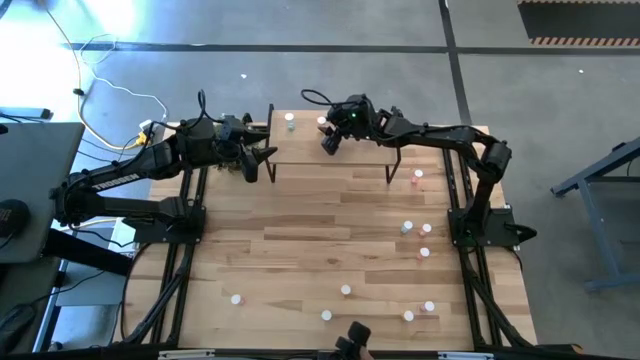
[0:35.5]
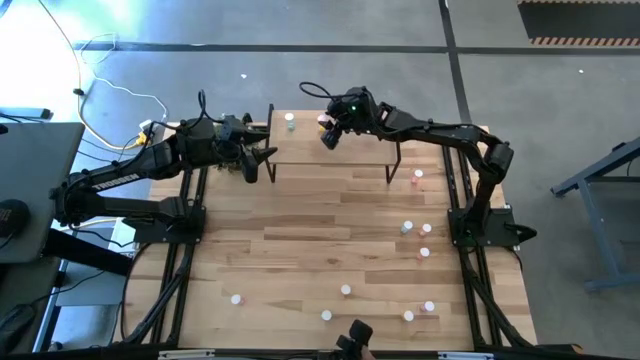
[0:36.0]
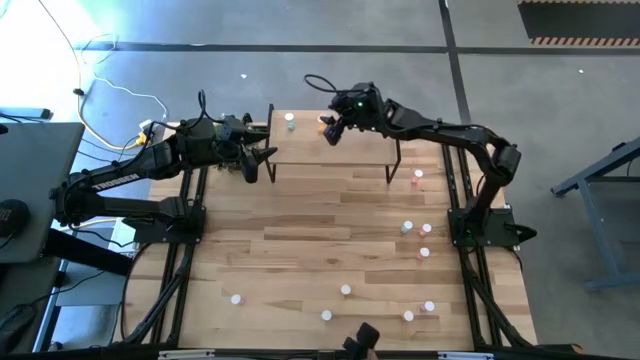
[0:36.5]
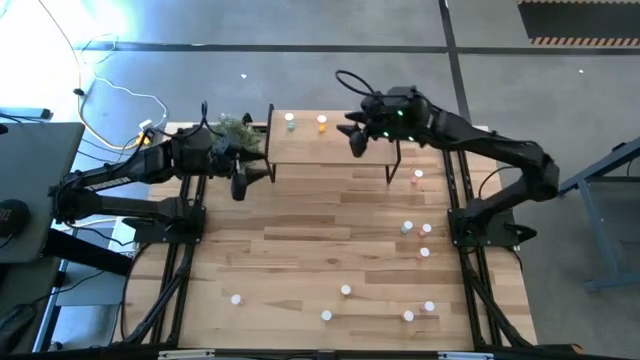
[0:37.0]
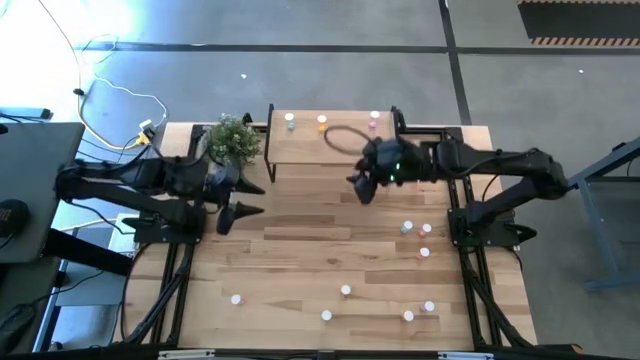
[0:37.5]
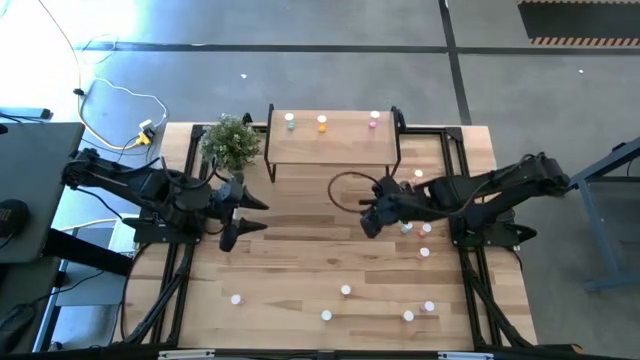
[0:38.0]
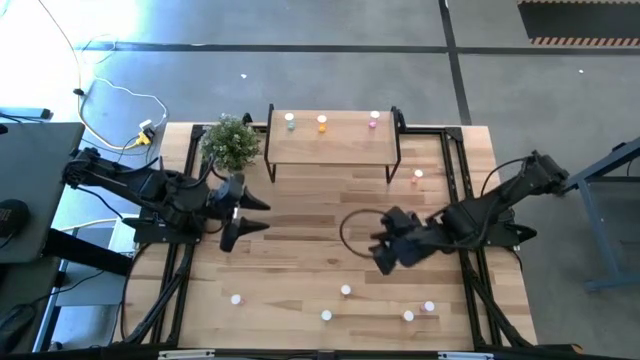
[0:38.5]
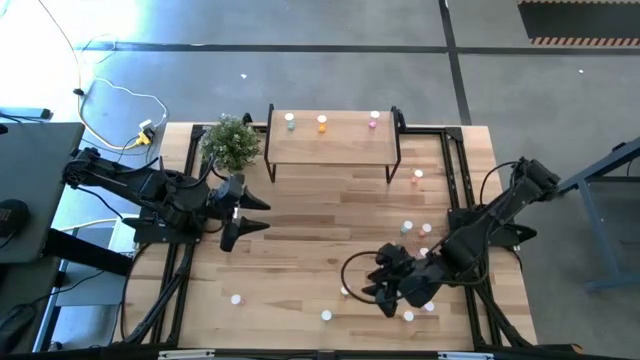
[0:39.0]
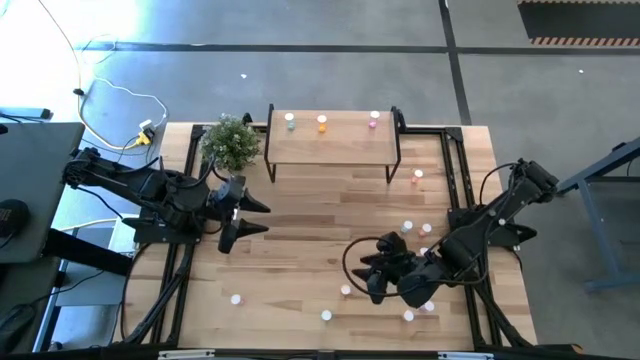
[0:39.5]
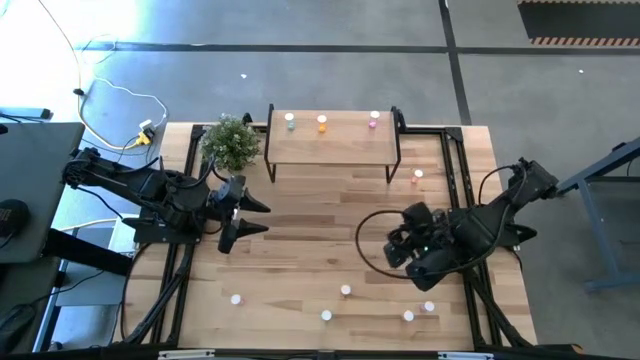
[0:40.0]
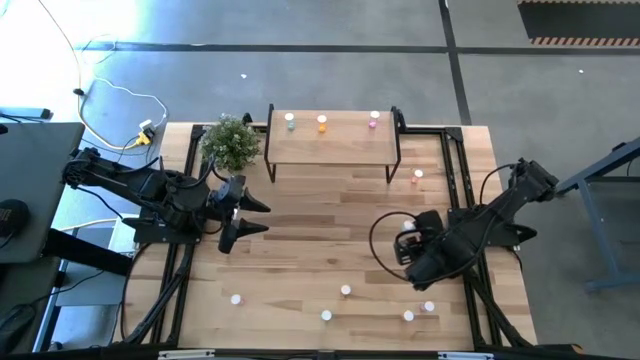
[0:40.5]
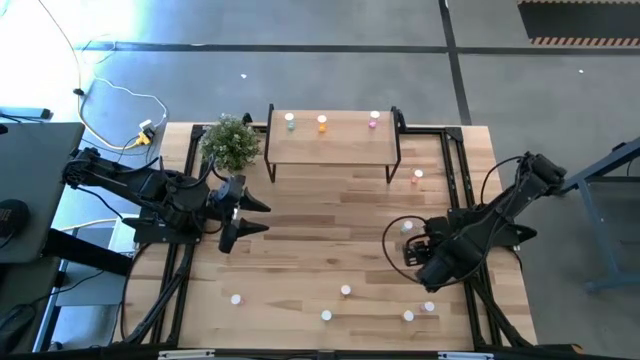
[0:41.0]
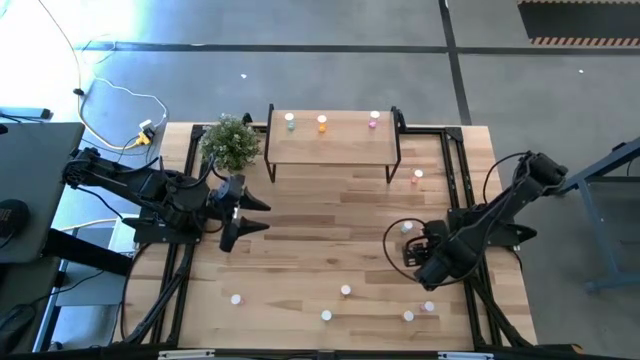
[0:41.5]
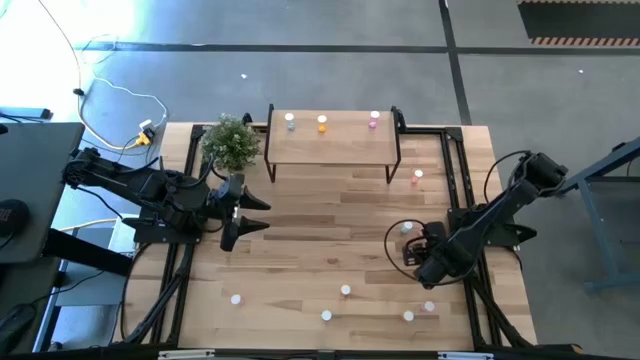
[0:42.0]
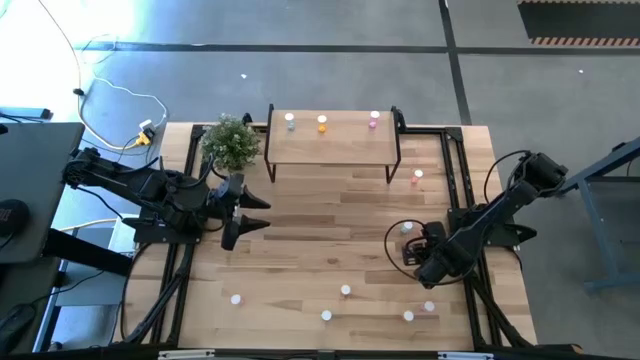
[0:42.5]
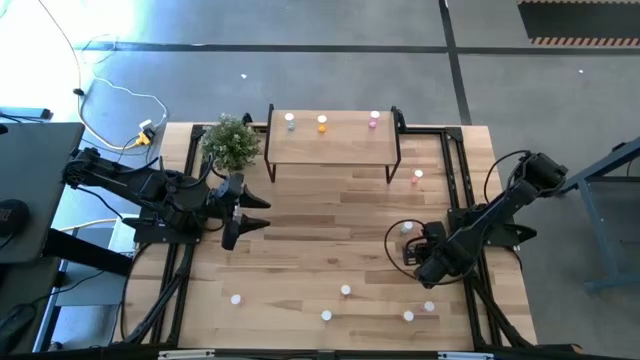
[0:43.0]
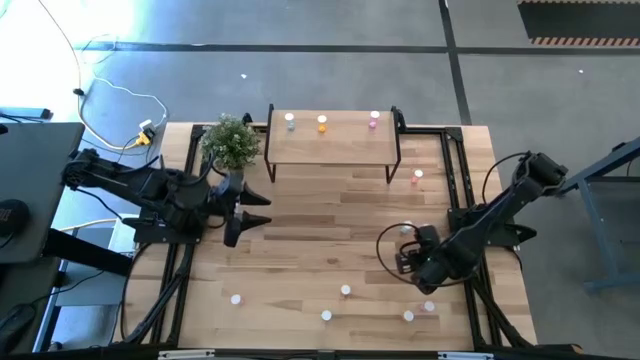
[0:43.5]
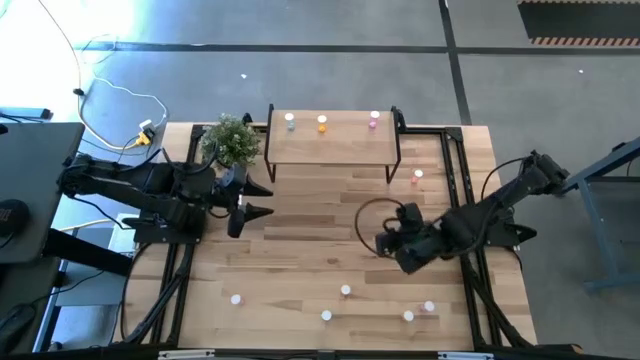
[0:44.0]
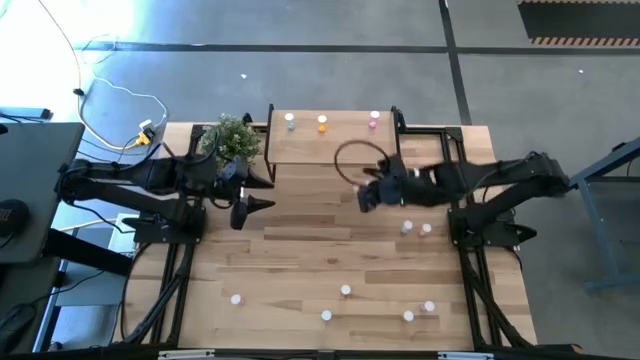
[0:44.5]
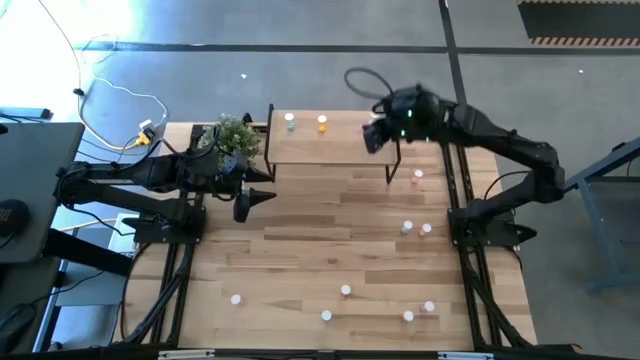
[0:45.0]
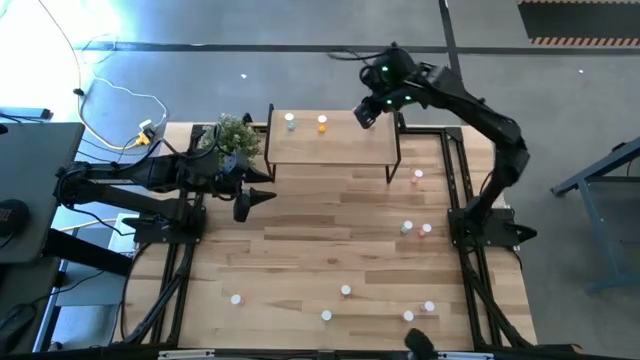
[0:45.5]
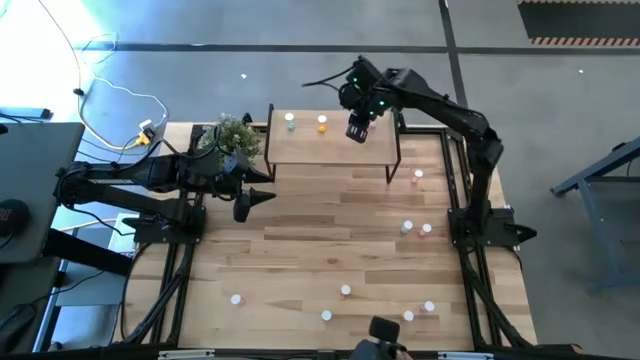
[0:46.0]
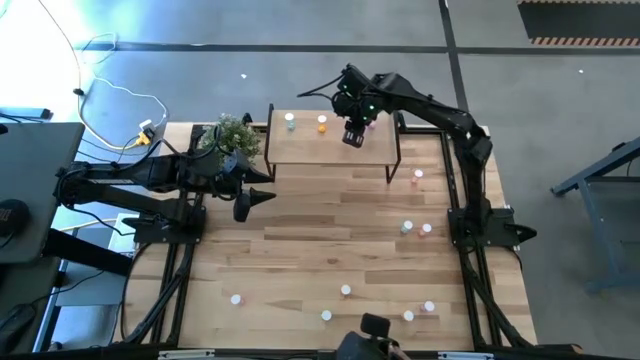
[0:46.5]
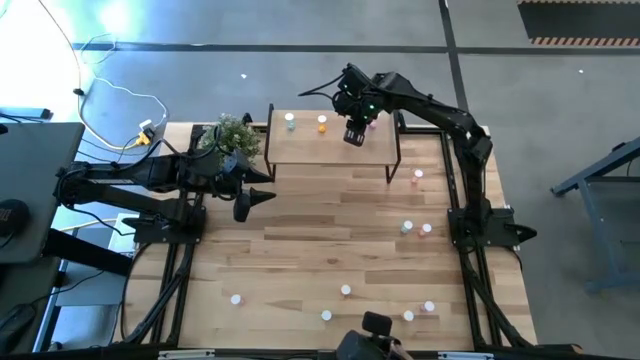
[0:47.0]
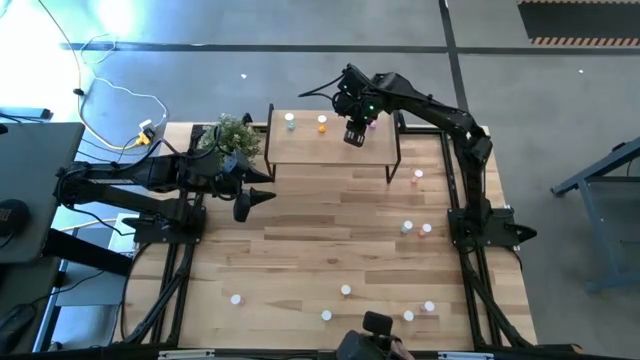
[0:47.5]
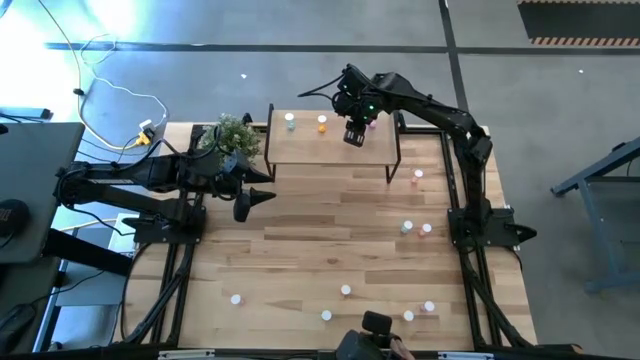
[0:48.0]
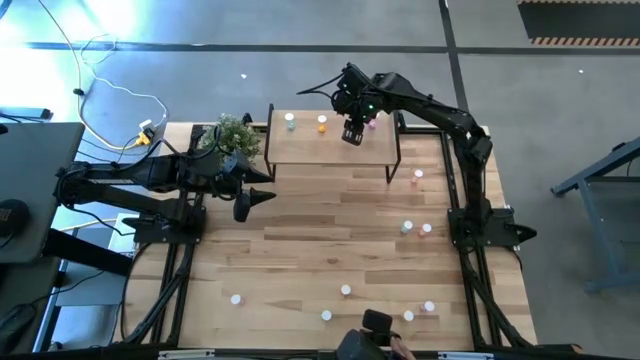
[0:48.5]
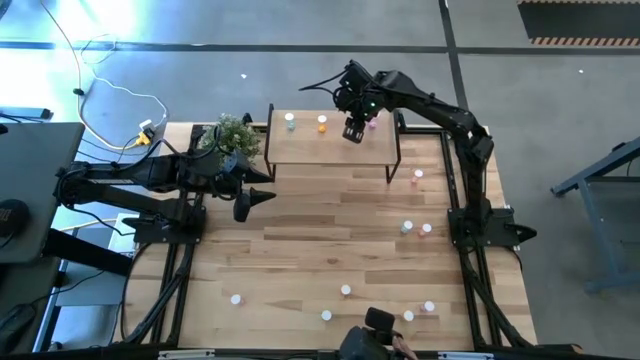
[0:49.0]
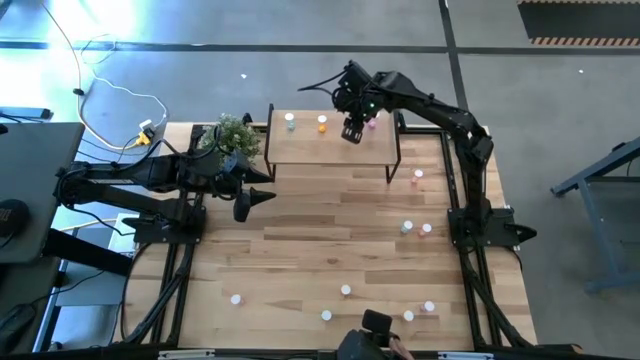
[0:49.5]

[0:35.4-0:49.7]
Task: Pick and place medicine bottles onto shelf by color
Put the middle pink pill bottle on the shelf

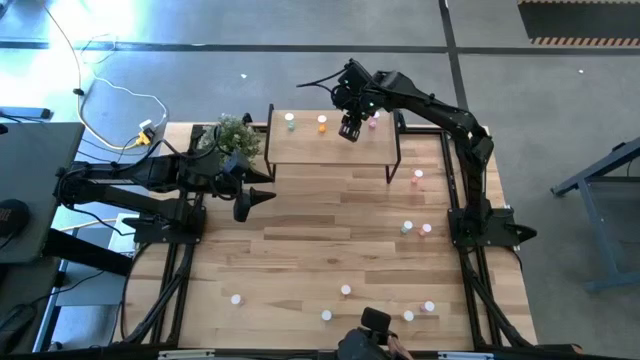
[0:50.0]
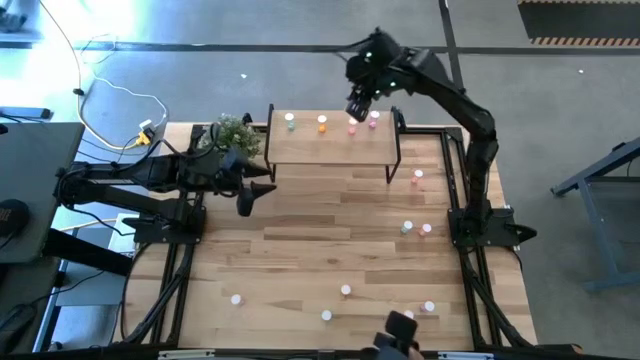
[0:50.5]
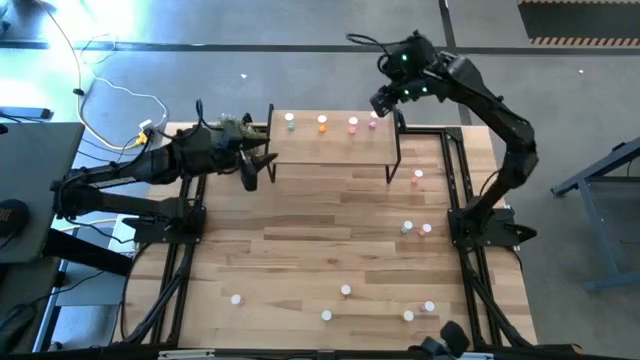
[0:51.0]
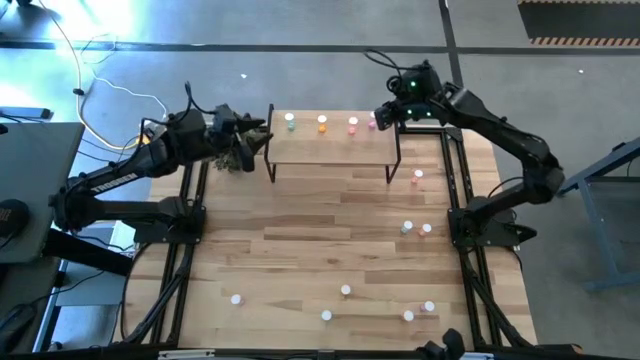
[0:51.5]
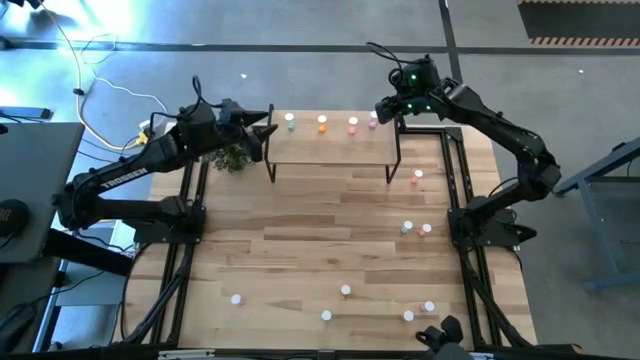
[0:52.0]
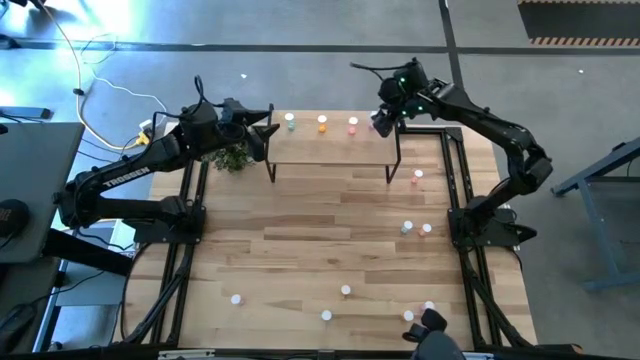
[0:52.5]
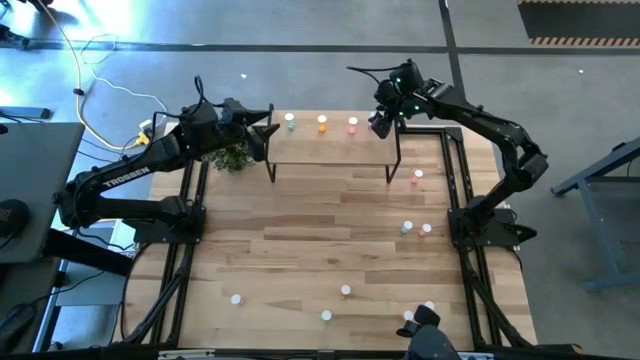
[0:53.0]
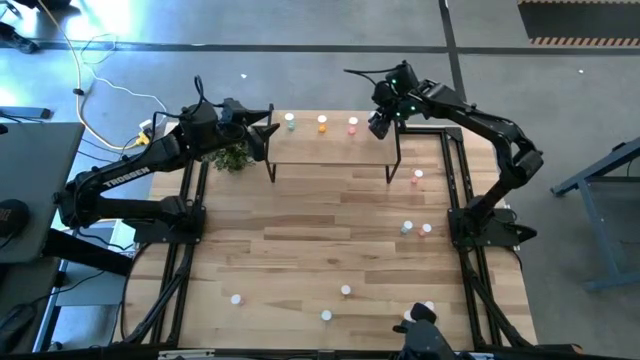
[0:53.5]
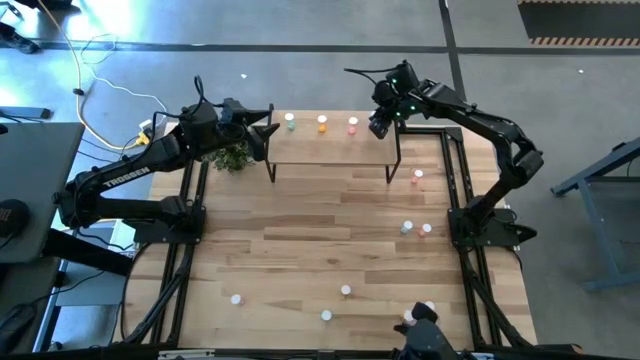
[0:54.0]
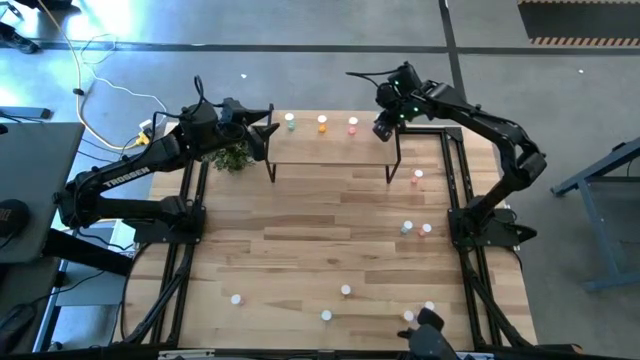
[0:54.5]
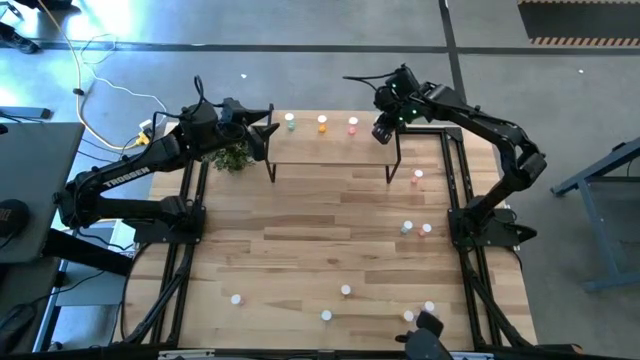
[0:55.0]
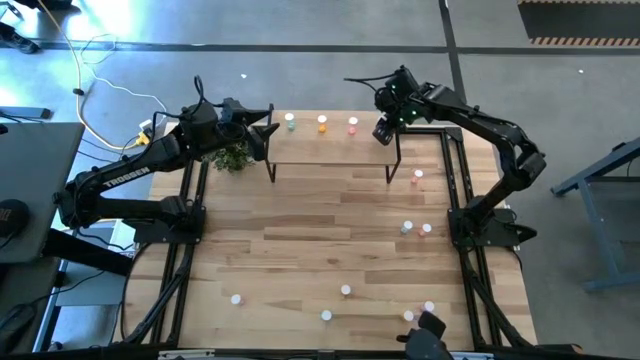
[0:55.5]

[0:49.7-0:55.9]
Adjust the violet pill bottle on the shelf
